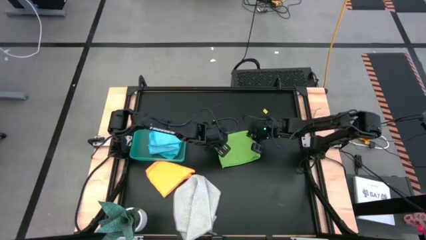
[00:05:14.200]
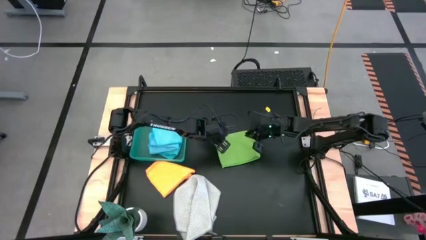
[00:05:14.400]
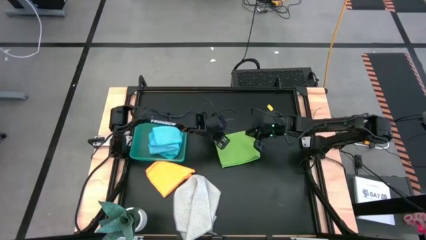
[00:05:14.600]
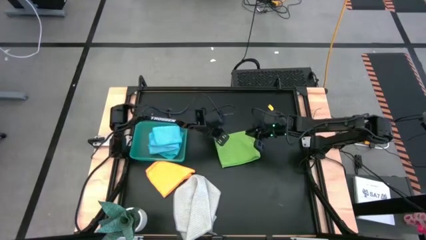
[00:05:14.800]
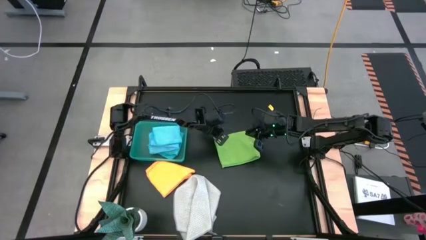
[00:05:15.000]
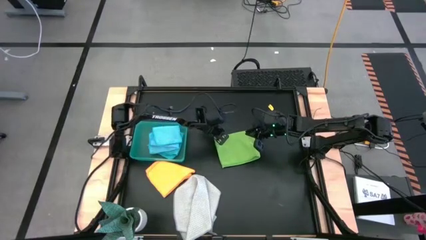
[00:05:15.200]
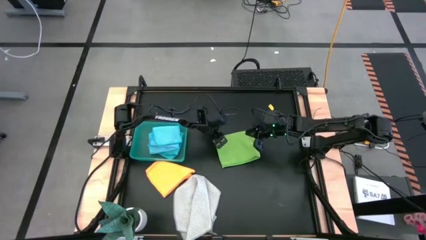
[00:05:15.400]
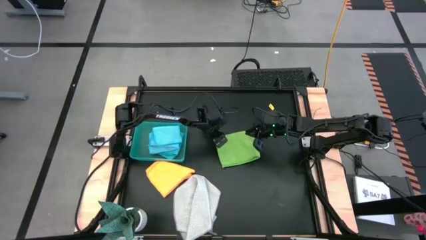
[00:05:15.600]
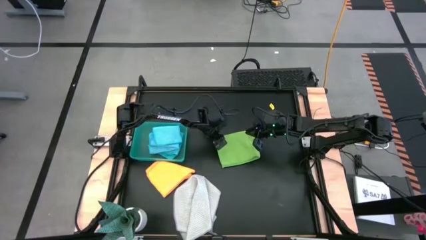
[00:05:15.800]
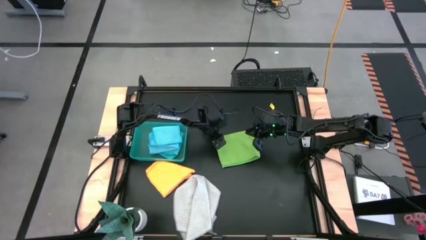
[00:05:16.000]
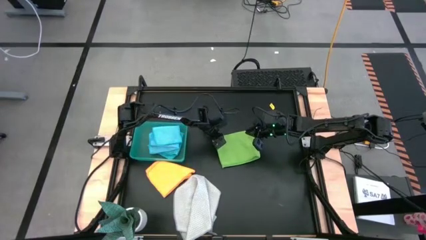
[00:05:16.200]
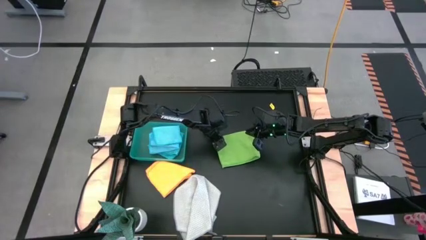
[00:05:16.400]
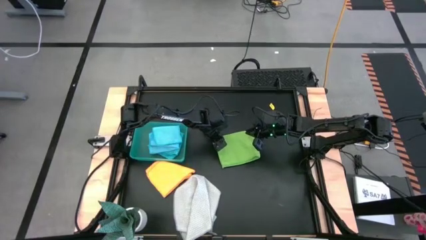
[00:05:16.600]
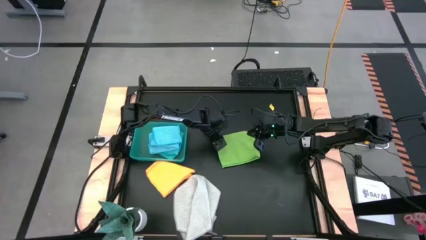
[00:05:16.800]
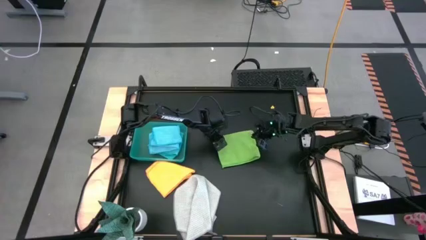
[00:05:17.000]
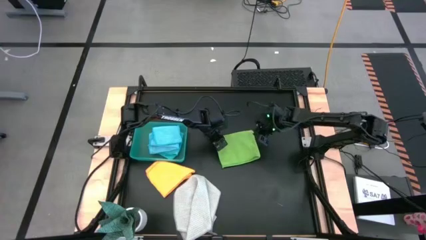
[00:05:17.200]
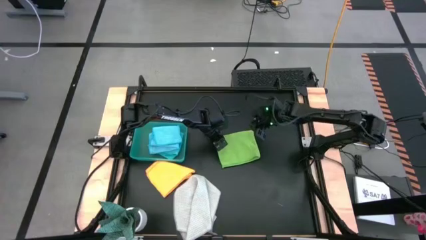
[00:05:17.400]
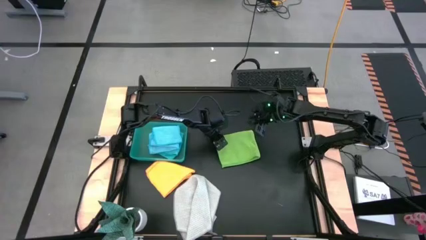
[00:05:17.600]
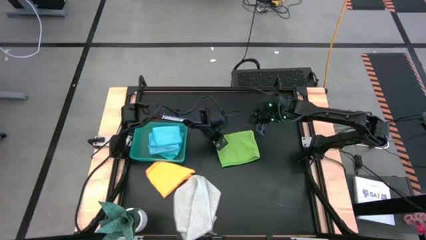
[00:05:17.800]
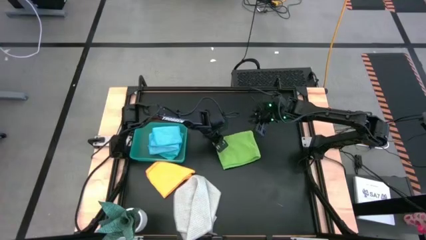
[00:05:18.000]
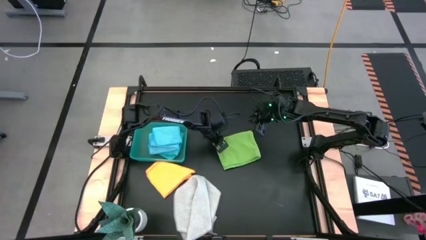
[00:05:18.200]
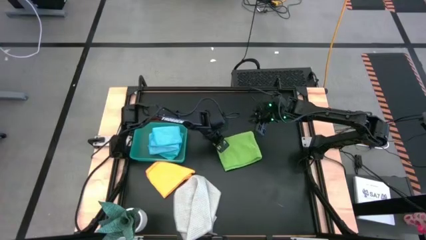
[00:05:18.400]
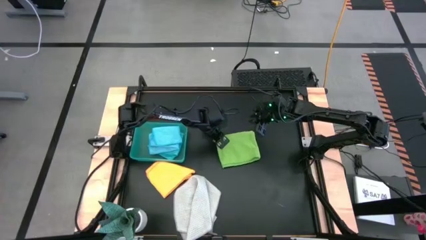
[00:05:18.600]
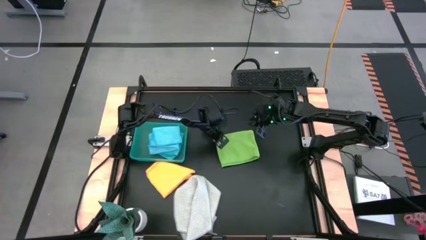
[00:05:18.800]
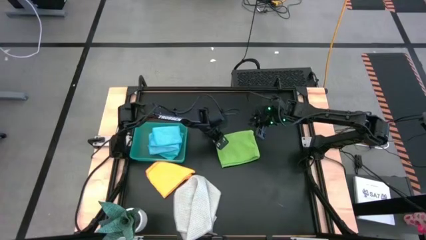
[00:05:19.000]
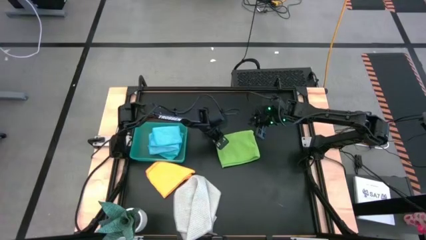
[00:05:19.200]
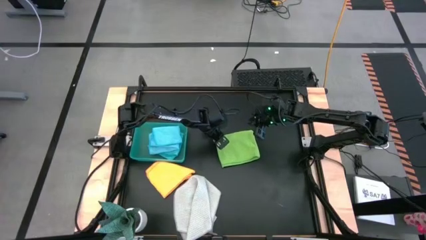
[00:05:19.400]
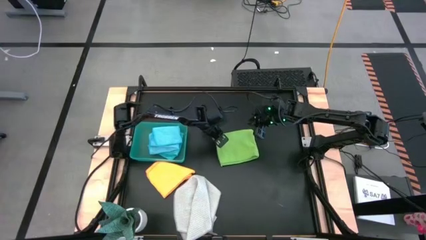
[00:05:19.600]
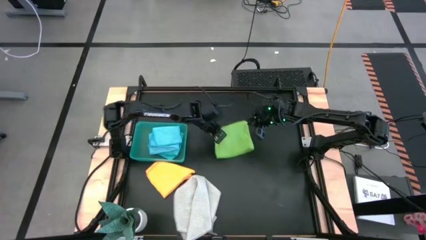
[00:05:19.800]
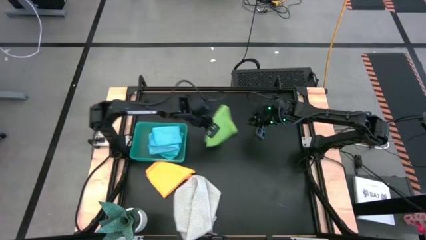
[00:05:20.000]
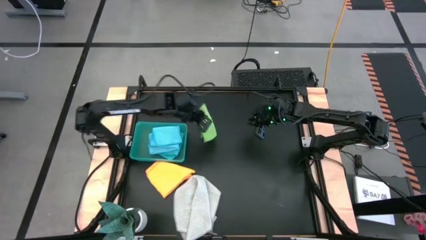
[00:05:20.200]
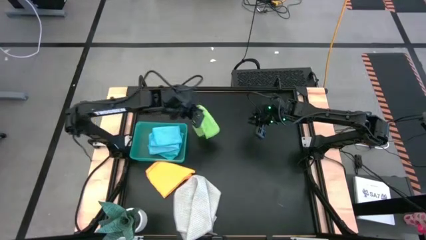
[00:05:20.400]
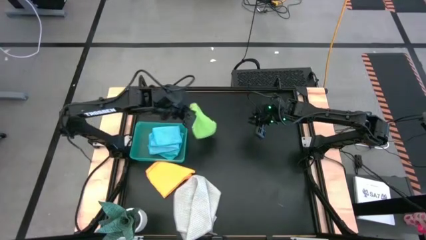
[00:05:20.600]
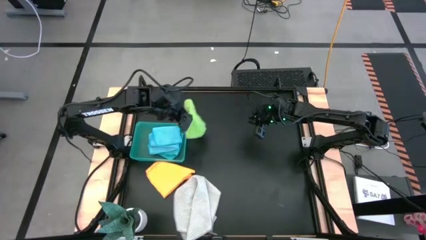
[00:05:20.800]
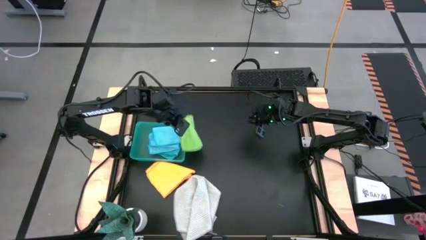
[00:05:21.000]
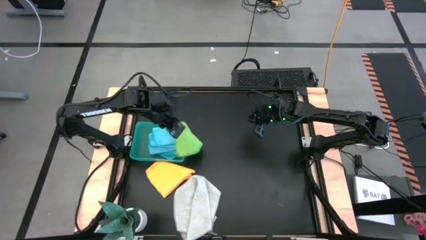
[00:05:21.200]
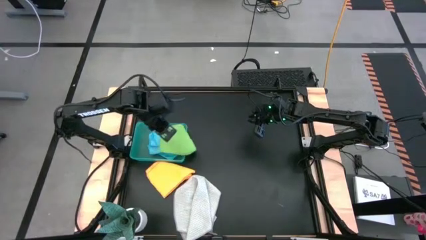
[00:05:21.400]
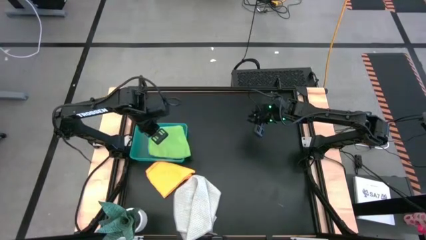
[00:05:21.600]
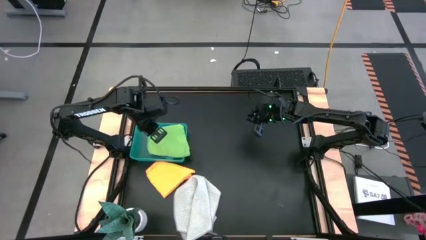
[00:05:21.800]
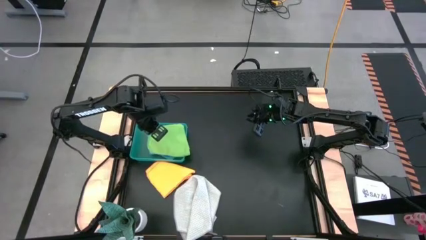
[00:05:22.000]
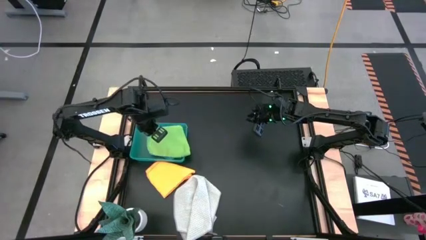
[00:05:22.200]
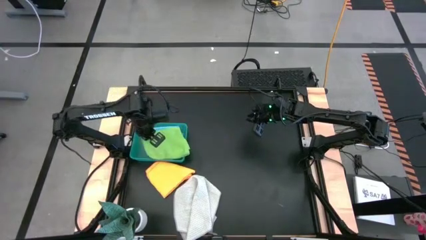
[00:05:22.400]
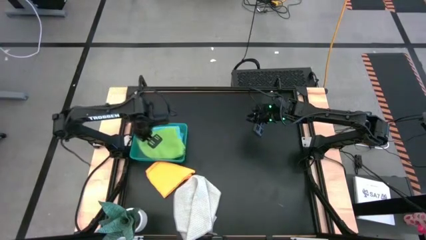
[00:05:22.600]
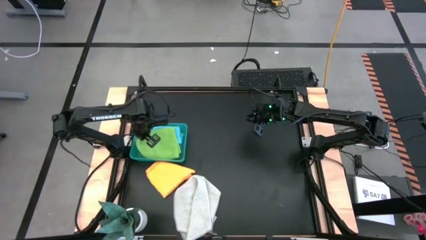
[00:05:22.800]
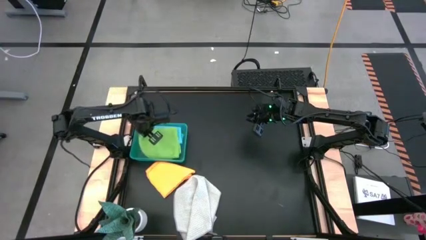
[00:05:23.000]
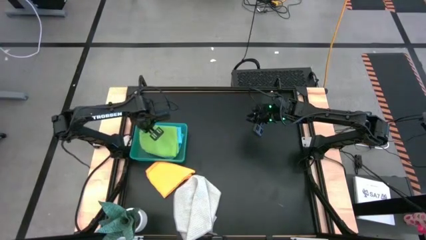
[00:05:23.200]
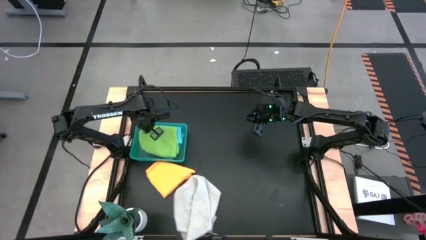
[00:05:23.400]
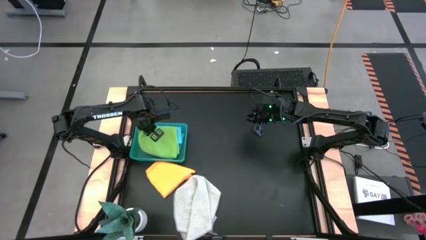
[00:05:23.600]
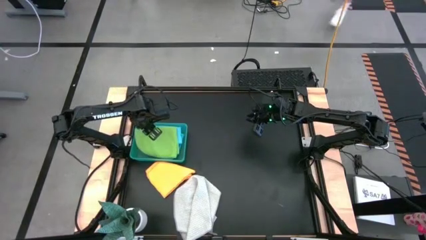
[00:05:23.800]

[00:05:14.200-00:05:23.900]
Task: Fold microfiber towels
Stack the folded green microfiber towel on top of the blue microfiber towel into the bin

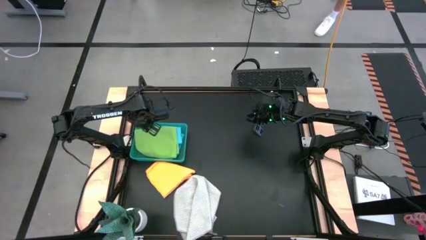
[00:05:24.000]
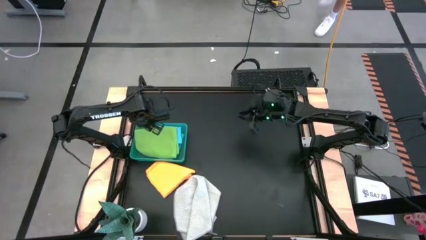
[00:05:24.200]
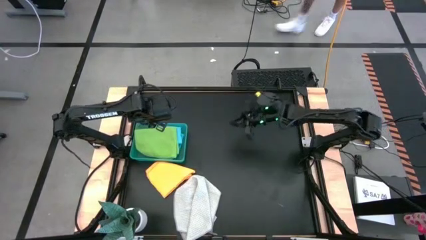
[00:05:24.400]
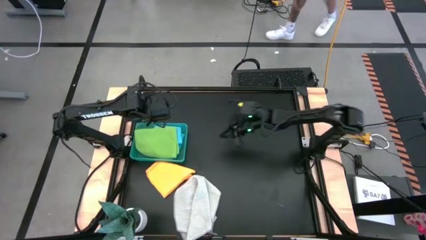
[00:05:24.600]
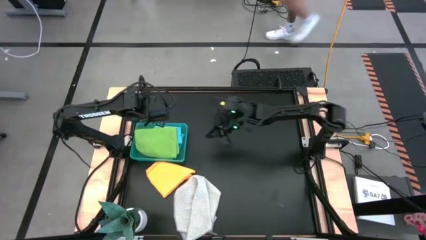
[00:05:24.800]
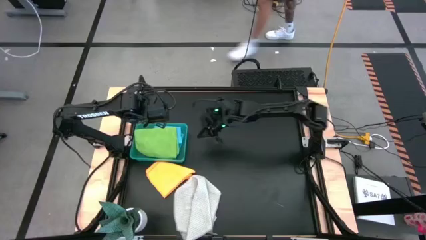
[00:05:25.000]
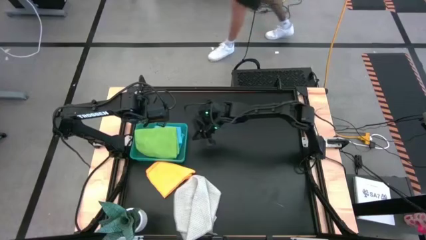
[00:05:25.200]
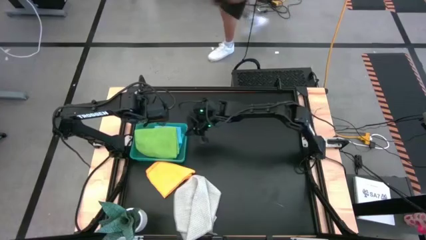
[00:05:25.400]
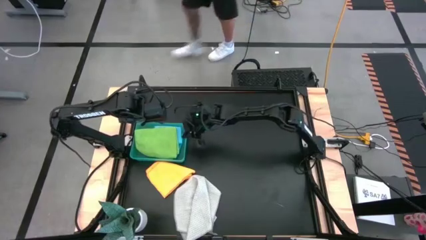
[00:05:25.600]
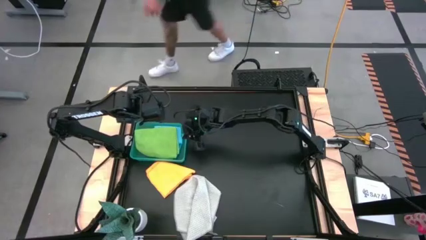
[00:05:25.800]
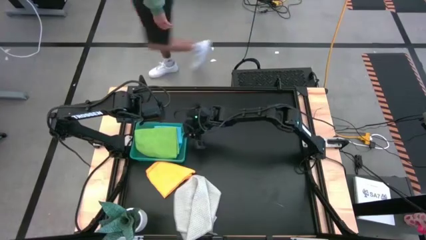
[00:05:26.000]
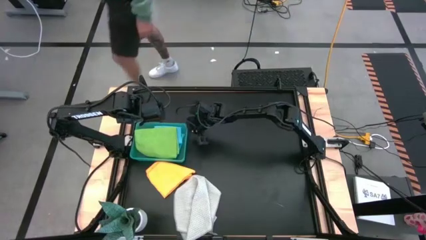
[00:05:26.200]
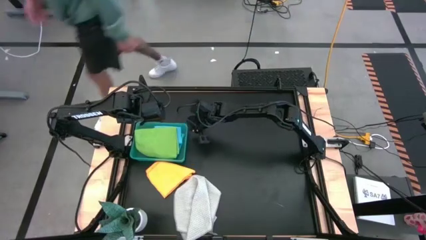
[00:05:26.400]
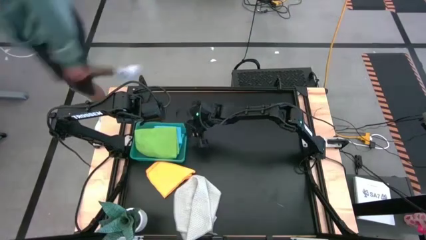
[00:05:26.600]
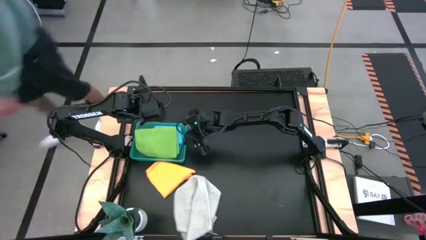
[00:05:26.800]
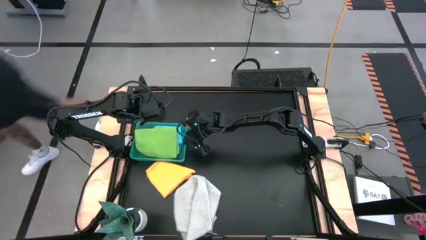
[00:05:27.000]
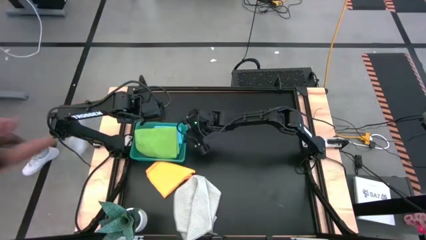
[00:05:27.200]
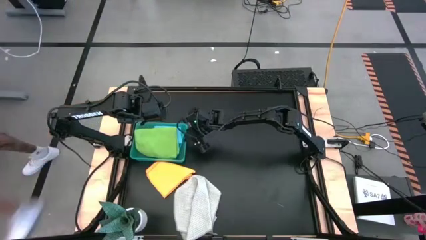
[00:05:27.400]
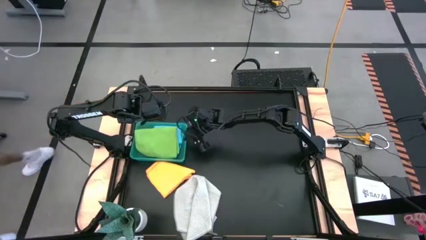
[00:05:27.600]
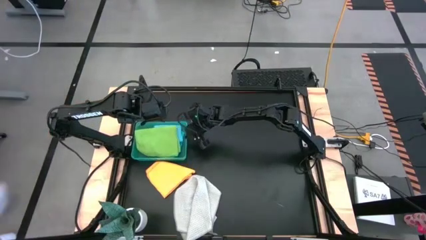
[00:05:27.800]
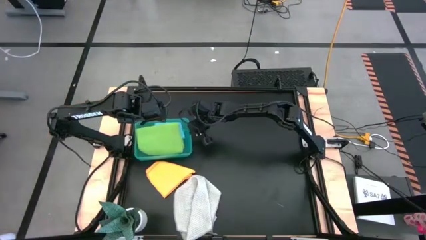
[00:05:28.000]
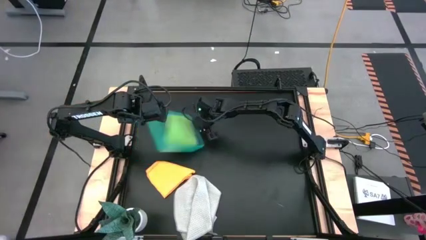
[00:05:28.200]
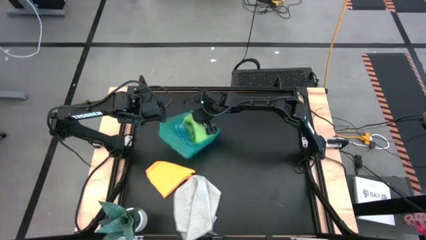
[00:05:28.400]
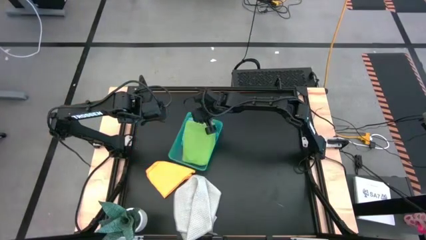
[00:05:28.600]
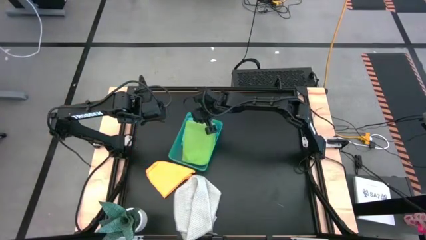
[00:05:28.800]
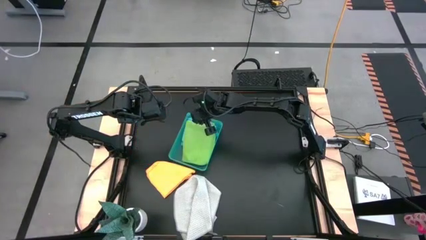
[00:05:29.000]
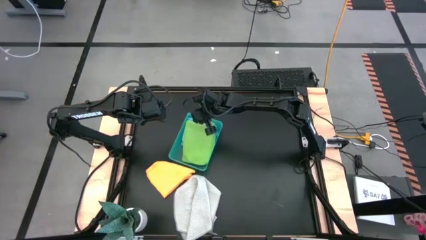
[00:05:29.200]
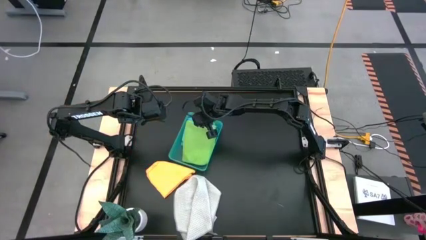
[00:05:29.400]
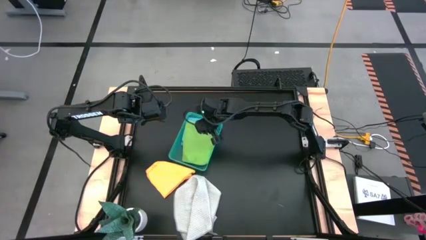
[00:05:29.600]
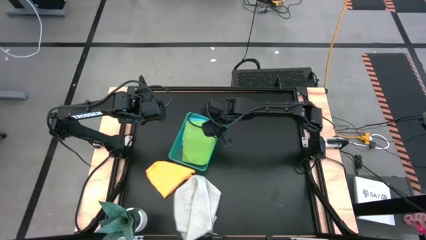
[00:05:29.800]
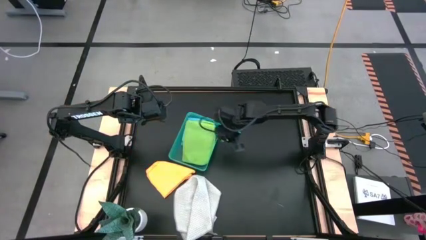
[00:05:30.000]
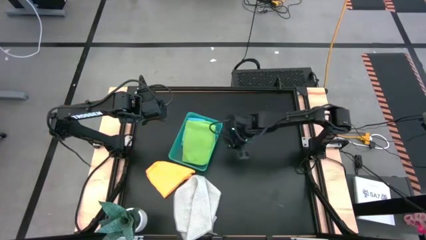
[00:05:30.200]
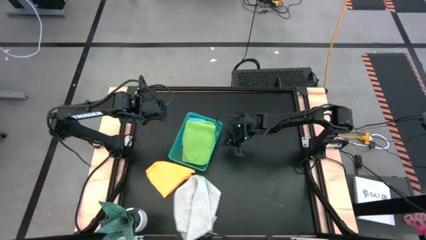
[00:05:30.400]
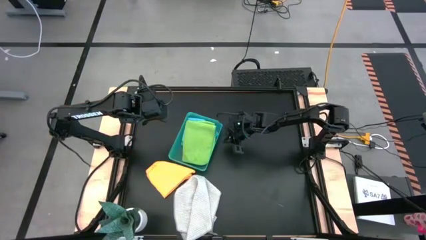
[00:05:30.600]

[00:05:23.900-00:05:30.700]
Move the bin to the top center of the table
